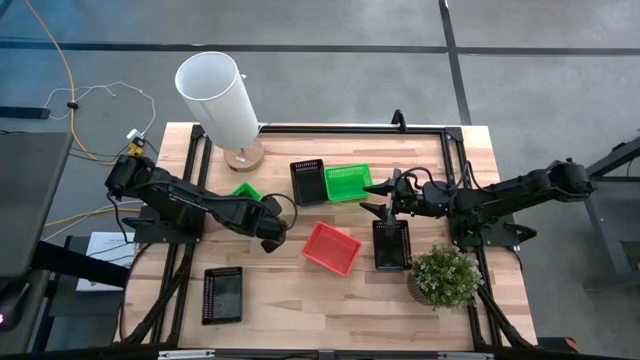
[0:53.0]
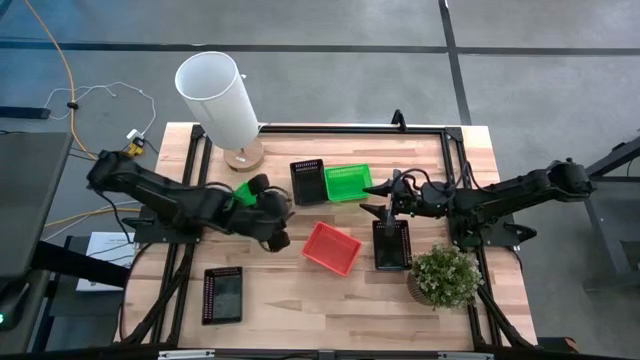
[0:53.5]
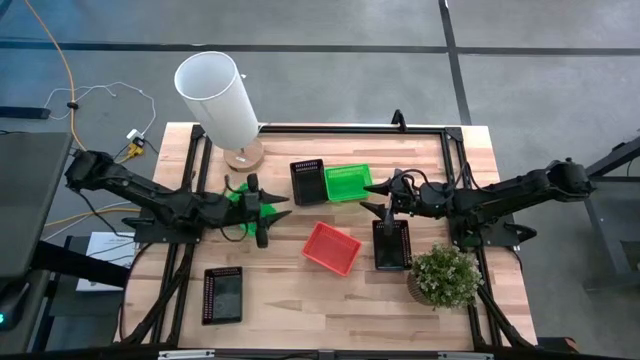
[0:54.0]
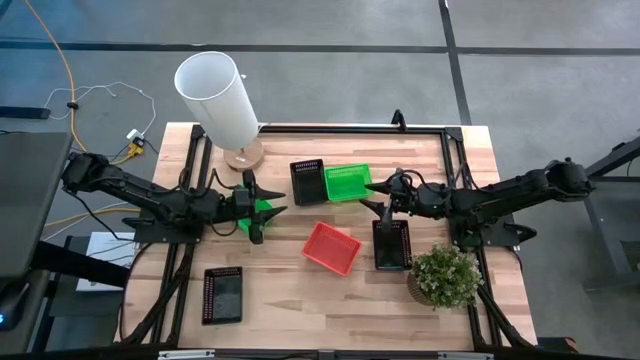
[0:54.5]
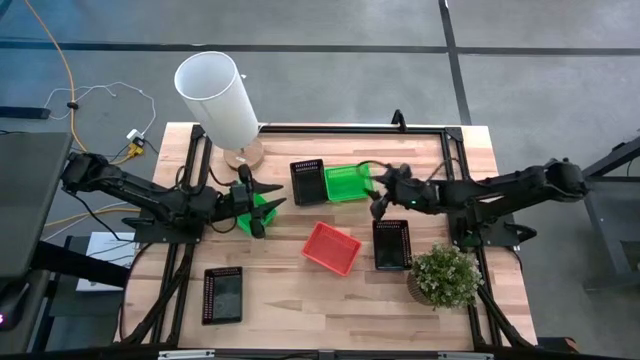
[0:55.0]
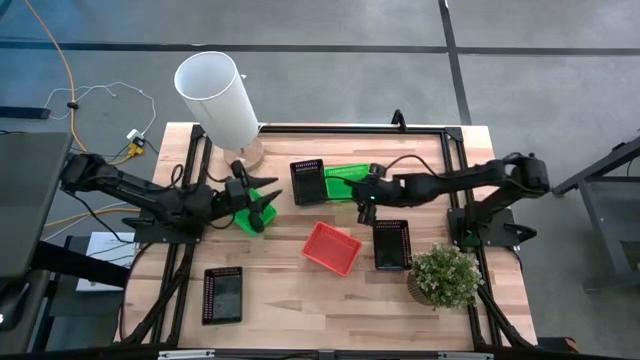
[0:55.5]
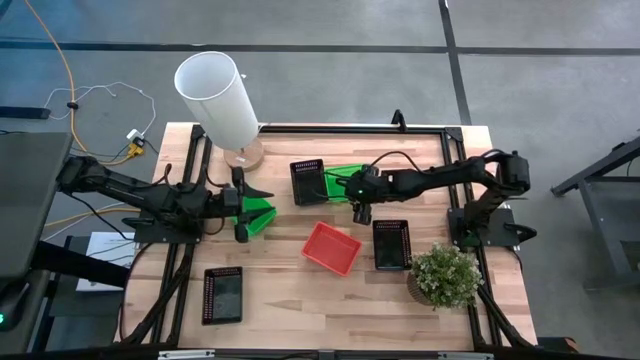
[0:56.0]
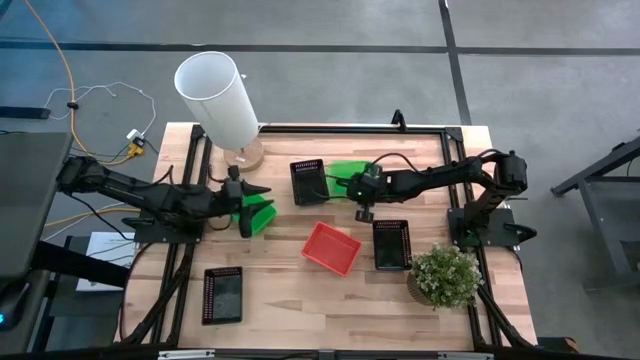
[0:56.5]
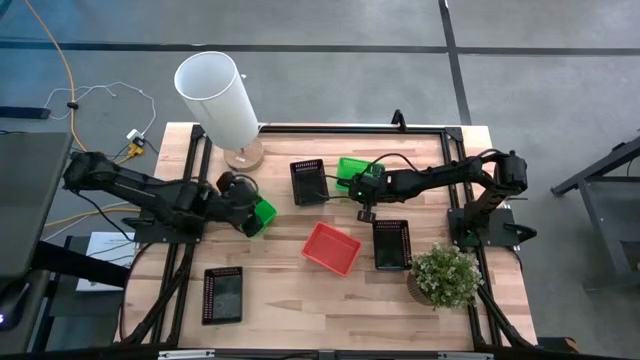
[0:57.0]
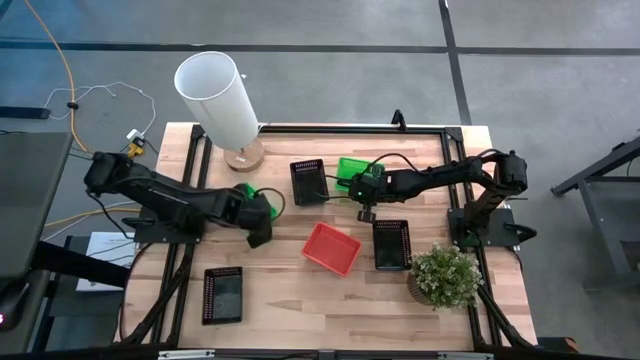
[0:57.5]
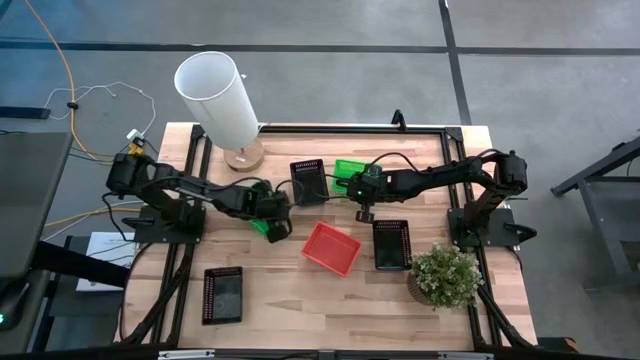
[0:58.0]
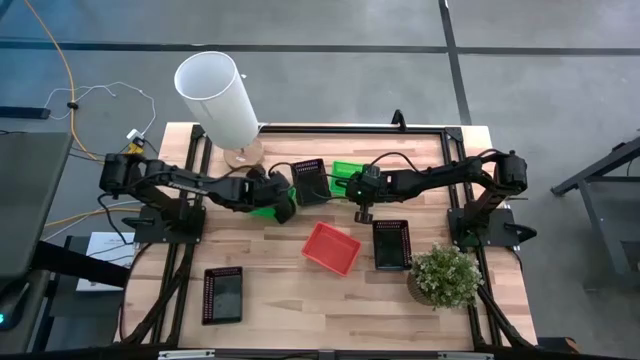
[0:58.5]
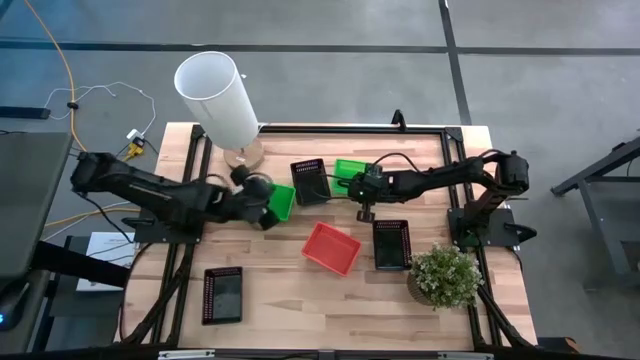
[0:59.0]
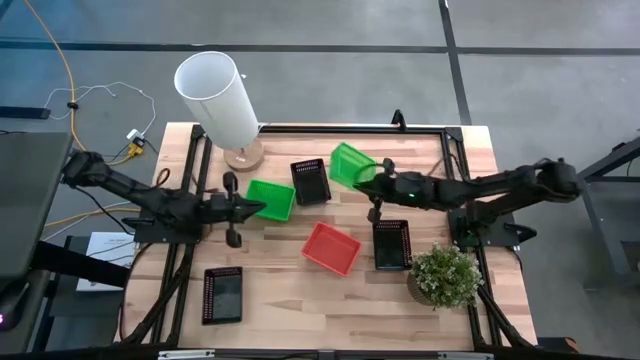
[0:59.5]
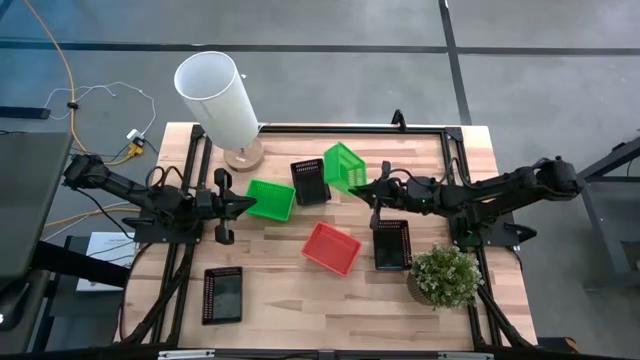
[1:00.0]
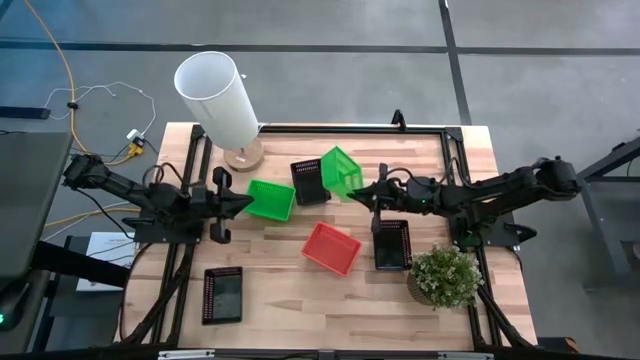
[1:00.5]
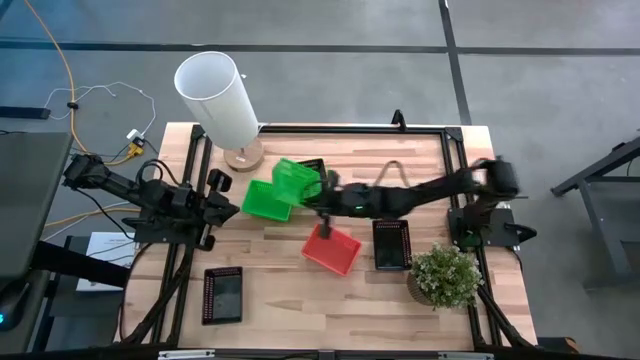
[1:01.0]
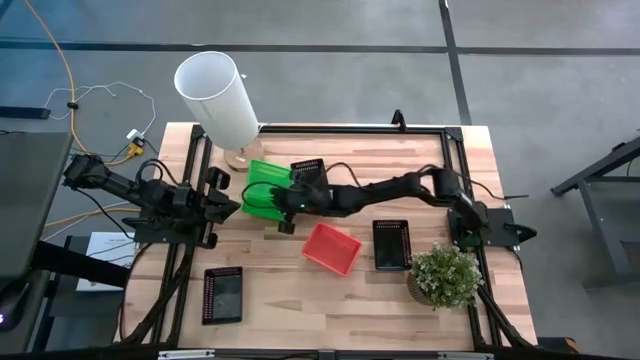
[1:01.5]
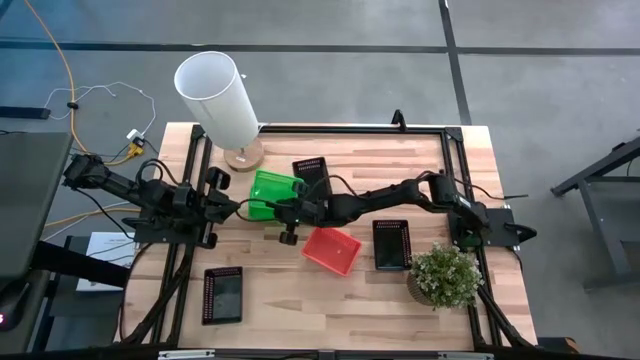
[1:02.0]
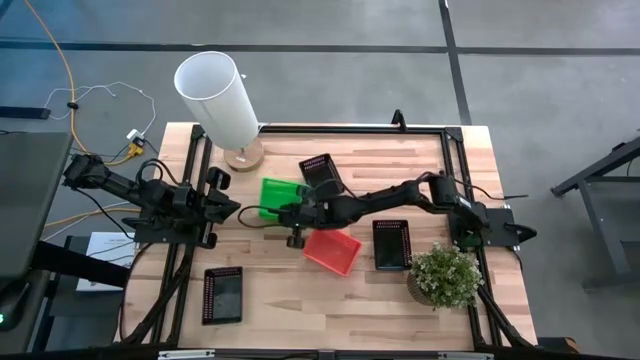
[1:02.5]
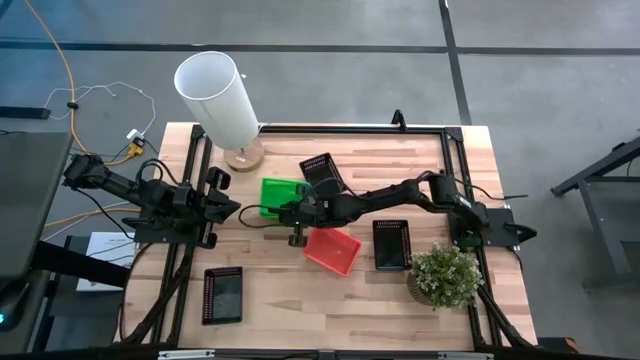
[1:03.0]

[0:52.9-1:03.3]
Stack the green bin on the green bin

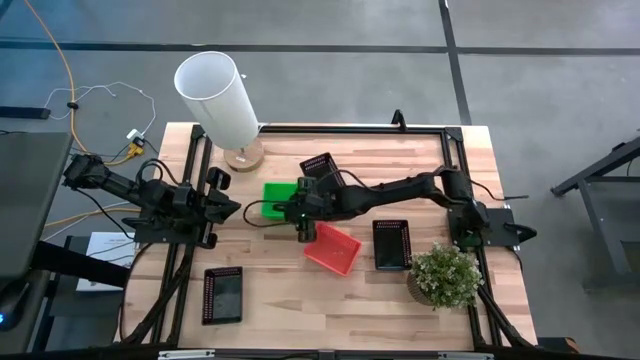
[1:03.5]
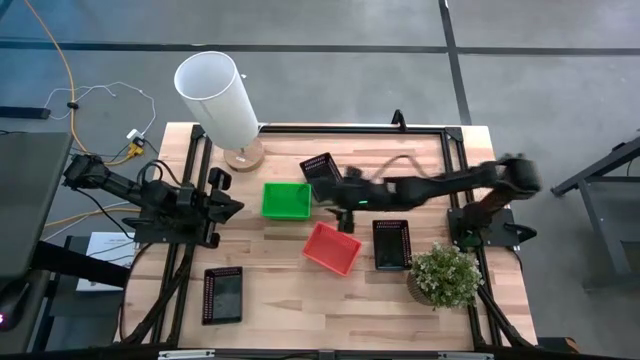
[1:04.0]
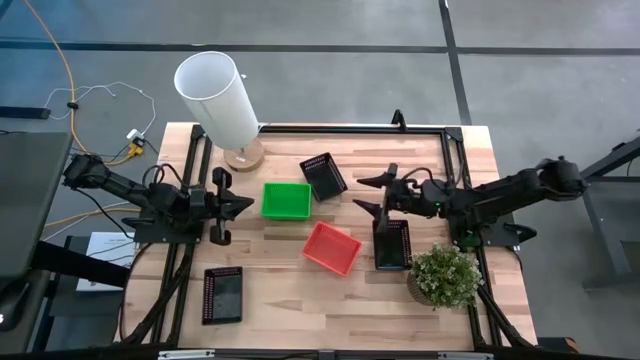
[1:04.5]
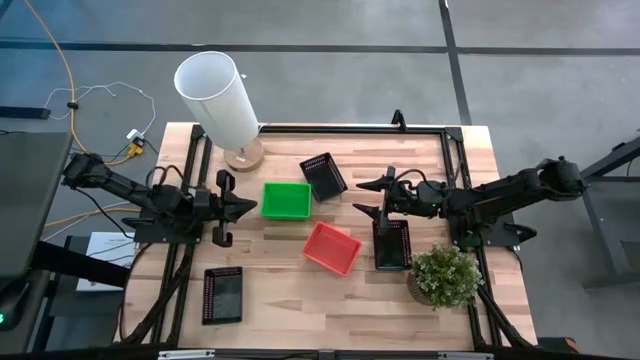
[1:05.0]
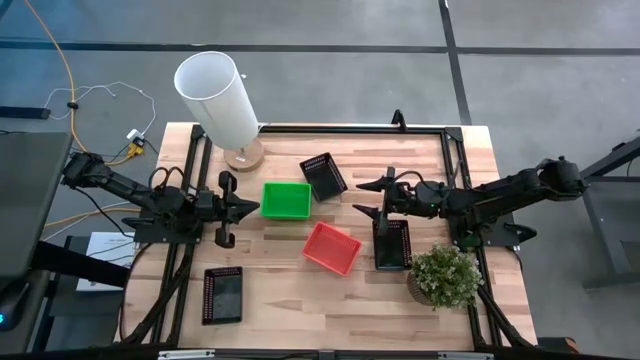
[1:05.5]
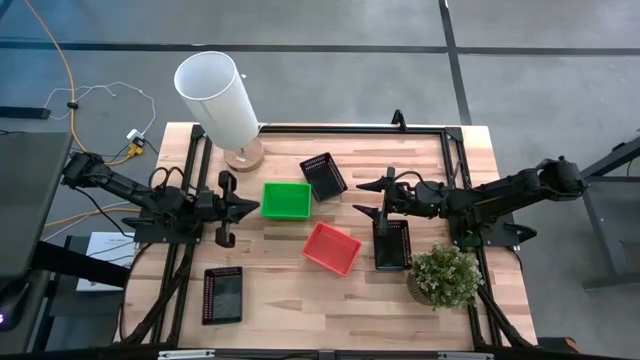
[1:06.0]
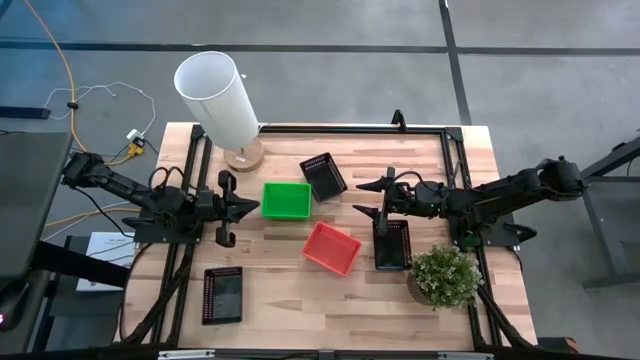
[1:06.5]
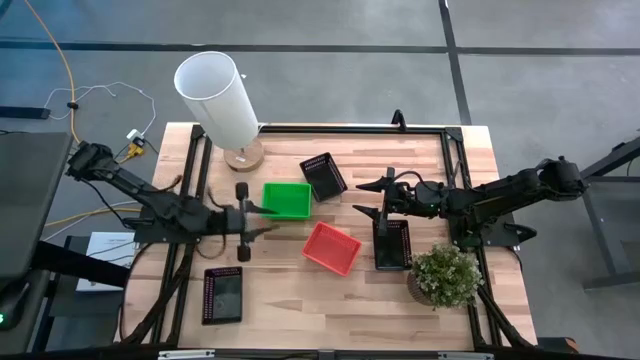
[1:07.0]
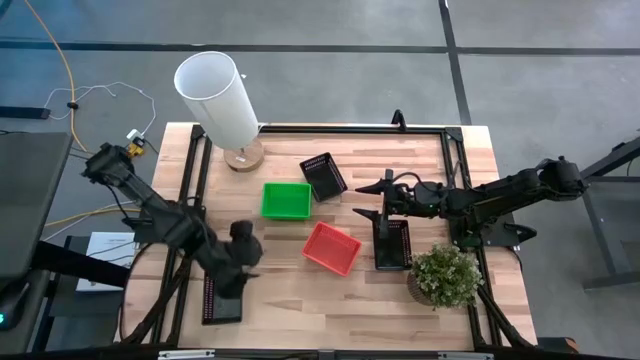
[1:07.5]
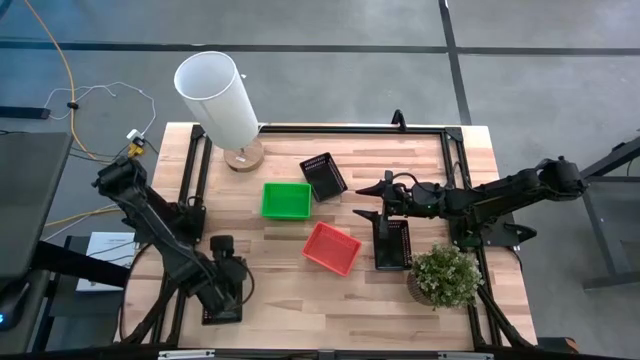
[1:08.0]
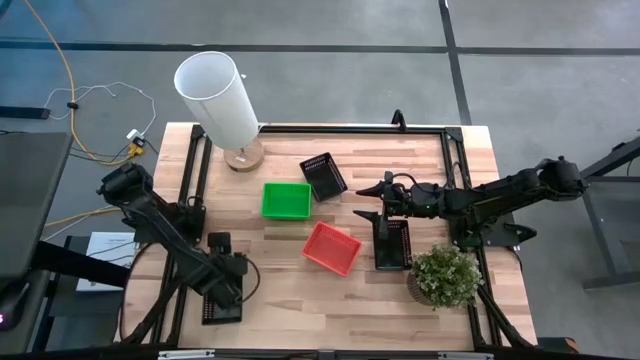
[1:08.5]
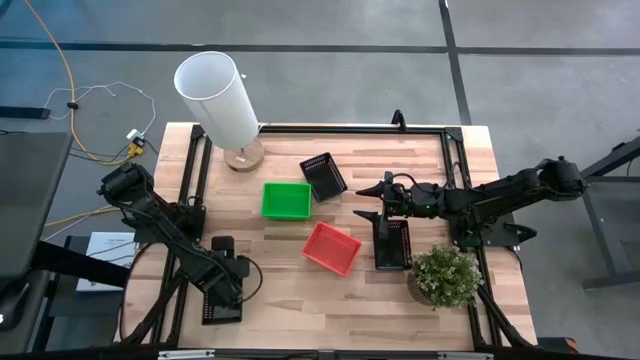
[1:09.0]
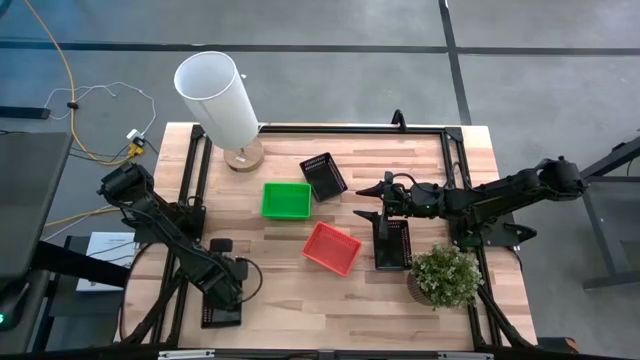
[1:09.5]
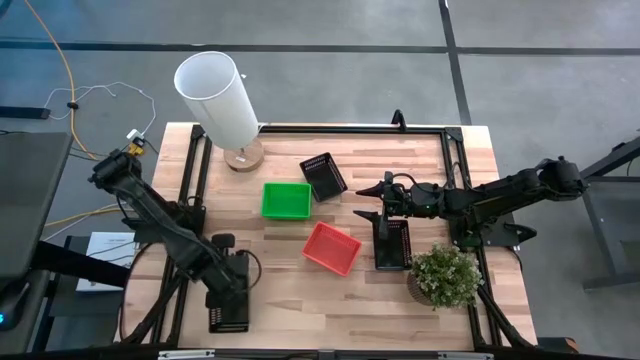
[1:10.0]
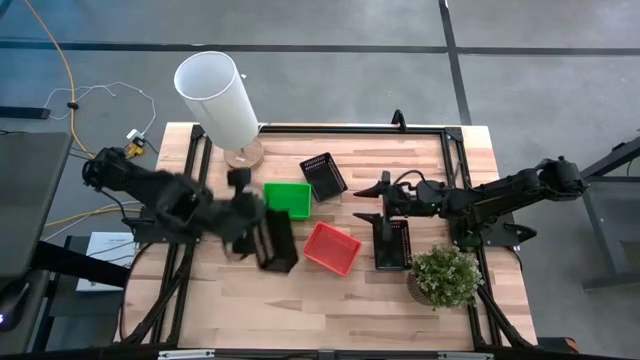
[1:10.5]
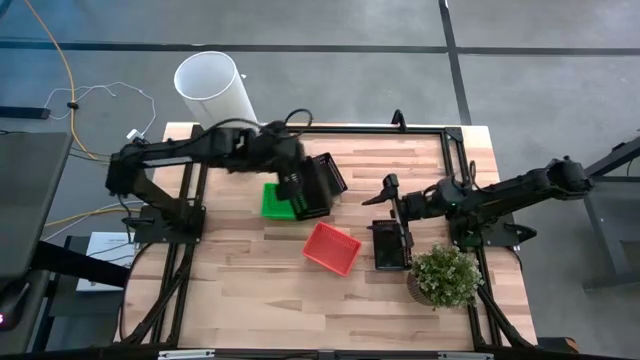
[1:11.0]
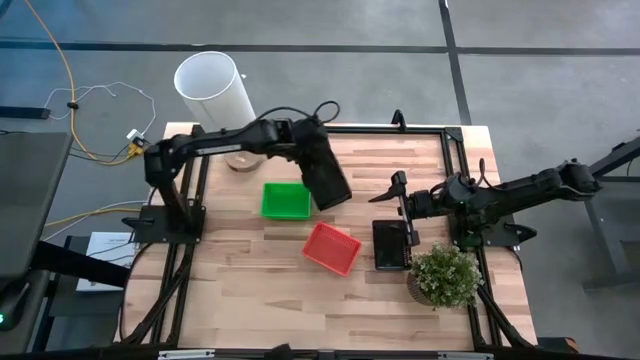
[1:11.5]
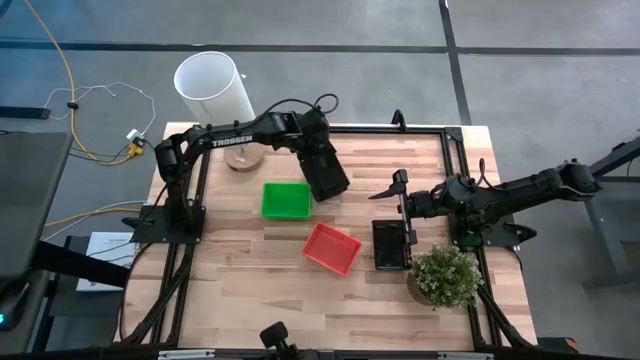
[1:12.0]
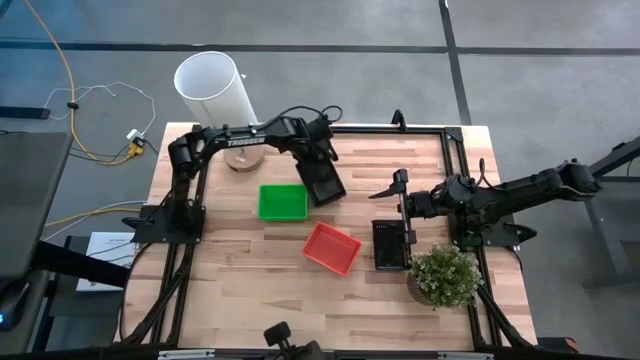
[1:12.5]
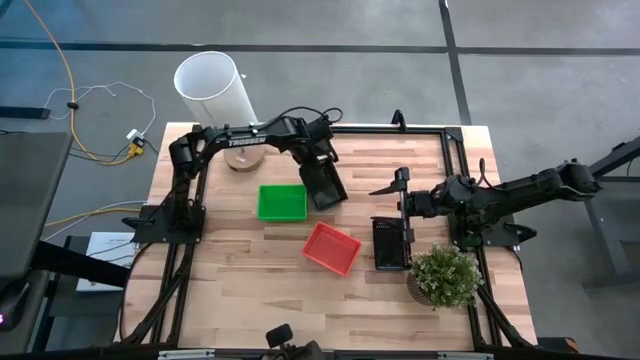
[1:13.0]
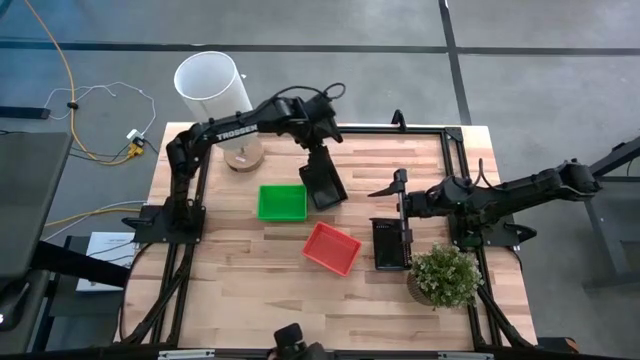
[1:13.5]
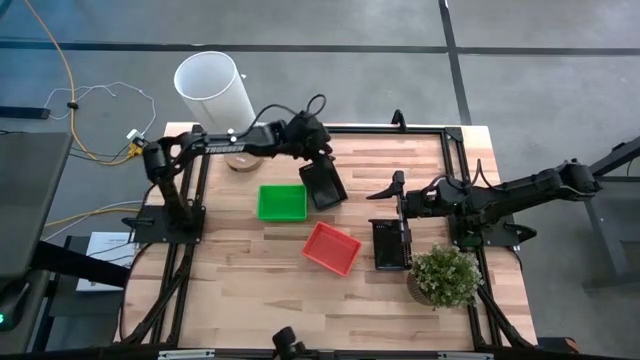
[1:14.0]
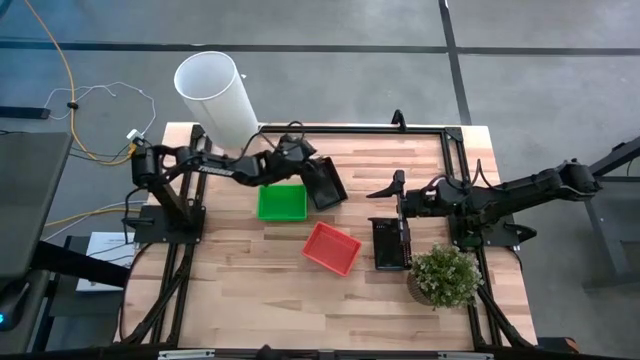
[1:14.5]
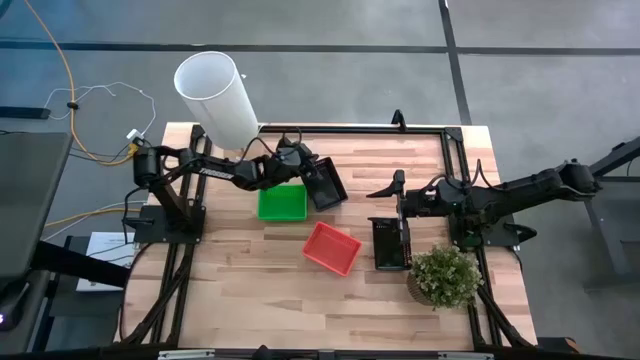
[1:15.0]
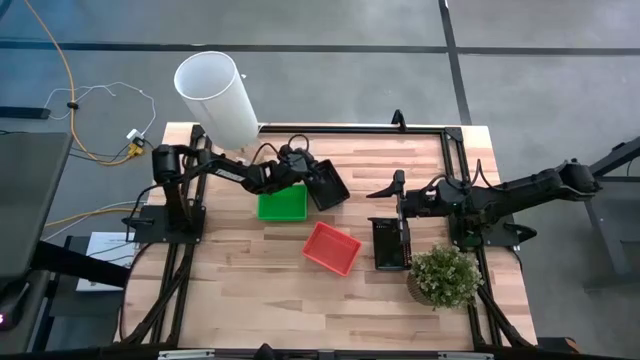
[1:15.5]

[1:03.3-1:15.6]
Stack the bottom black bin on the middle black bin
